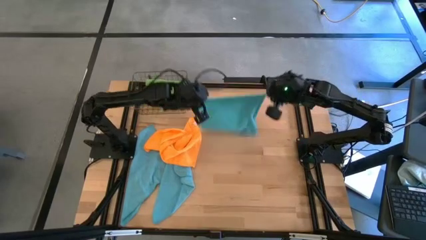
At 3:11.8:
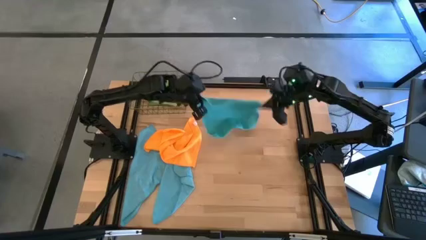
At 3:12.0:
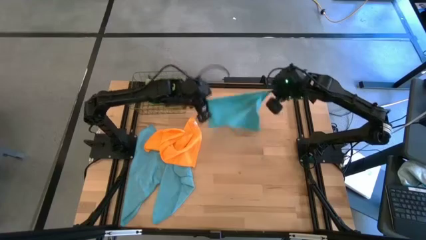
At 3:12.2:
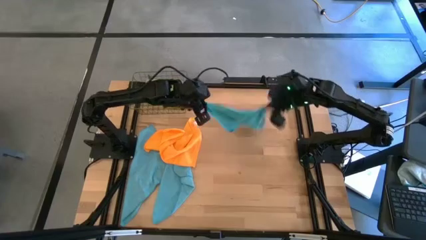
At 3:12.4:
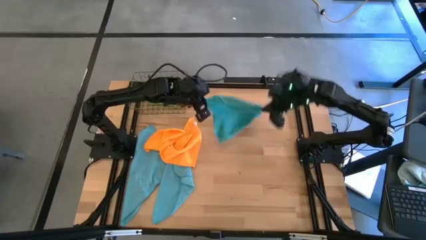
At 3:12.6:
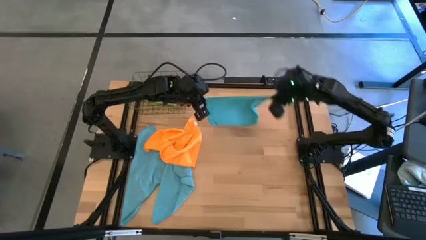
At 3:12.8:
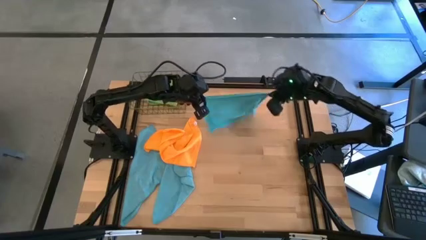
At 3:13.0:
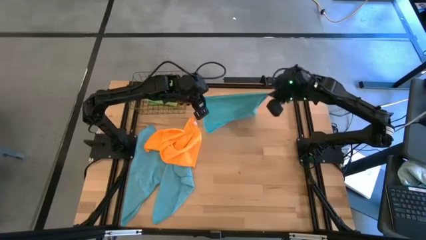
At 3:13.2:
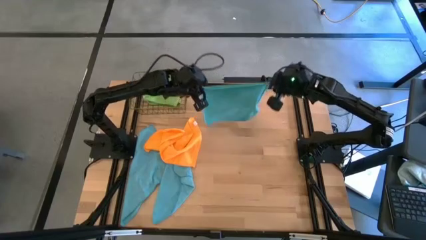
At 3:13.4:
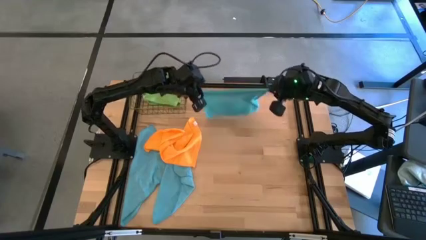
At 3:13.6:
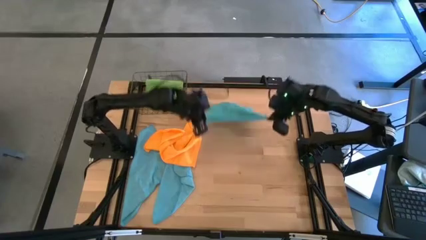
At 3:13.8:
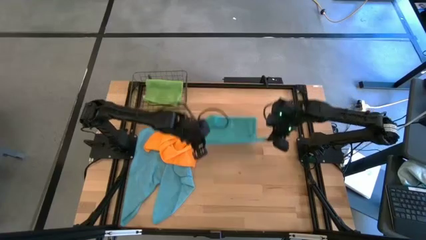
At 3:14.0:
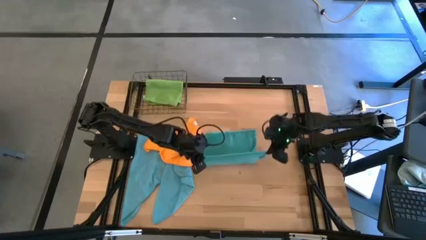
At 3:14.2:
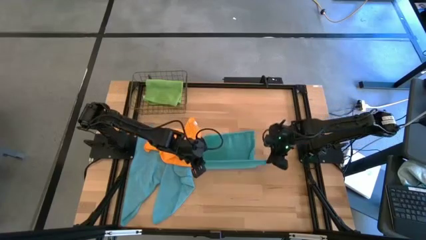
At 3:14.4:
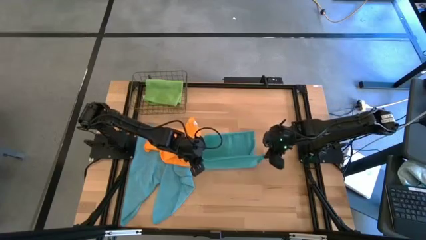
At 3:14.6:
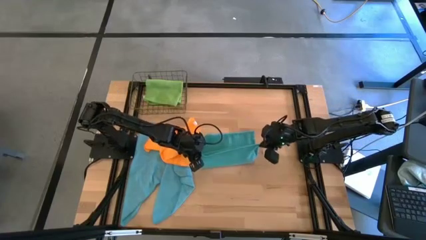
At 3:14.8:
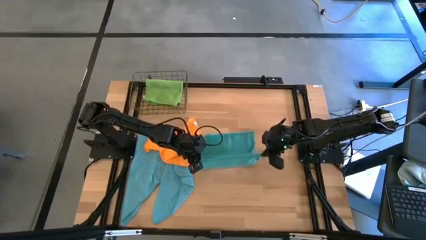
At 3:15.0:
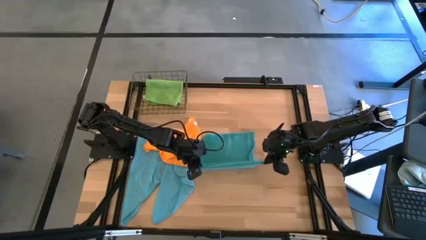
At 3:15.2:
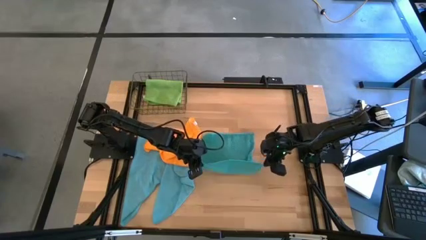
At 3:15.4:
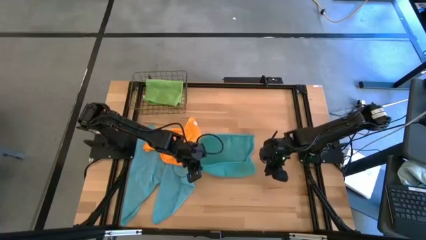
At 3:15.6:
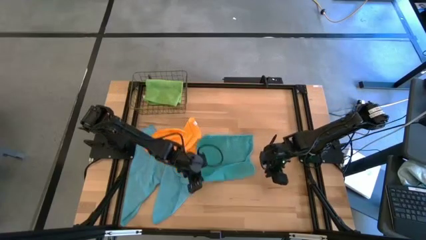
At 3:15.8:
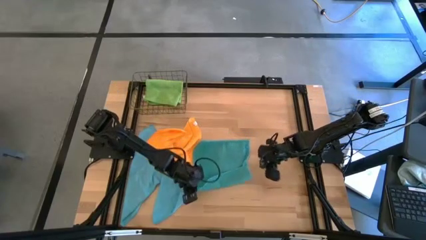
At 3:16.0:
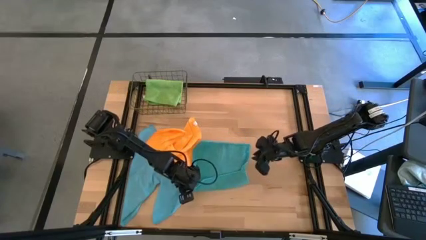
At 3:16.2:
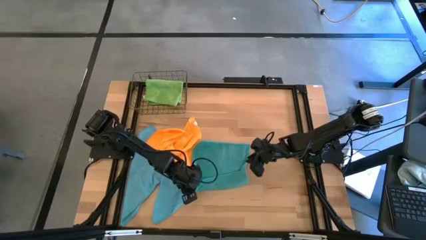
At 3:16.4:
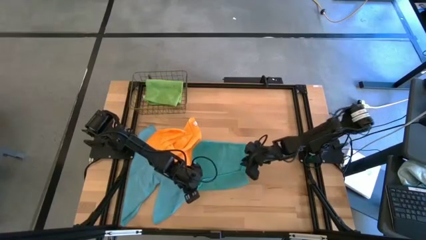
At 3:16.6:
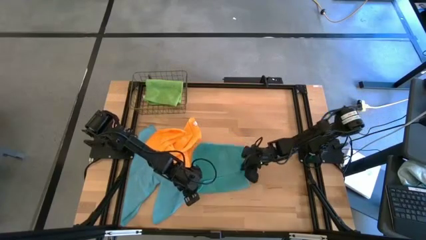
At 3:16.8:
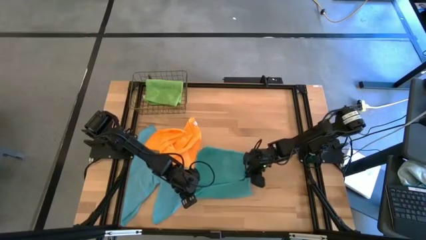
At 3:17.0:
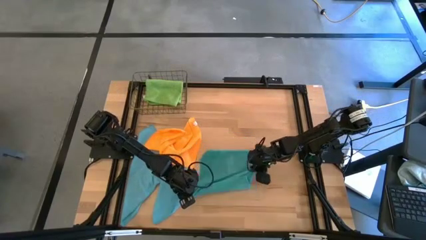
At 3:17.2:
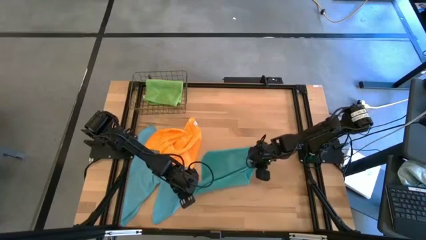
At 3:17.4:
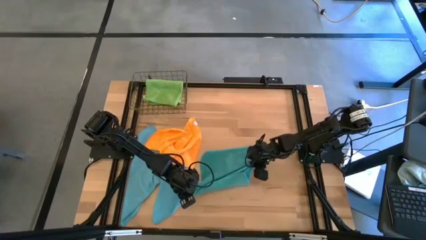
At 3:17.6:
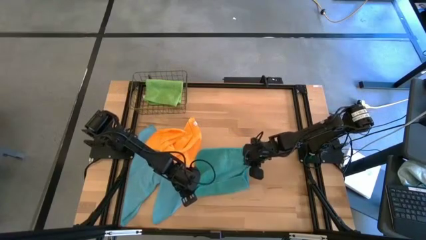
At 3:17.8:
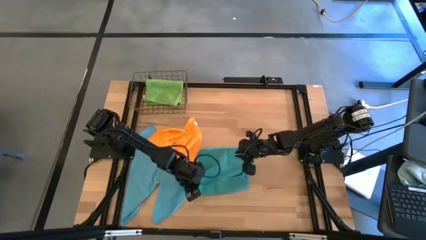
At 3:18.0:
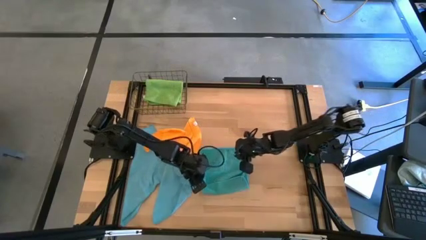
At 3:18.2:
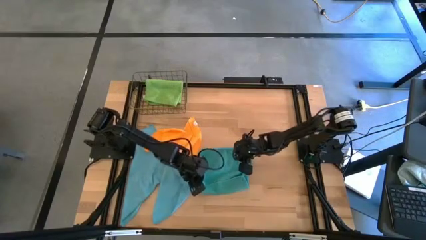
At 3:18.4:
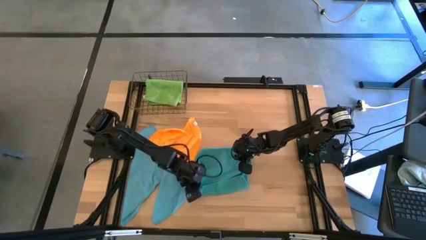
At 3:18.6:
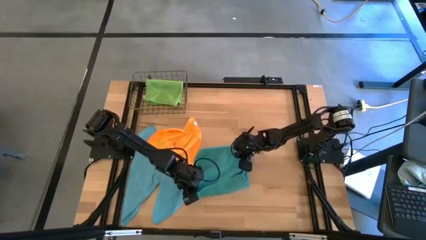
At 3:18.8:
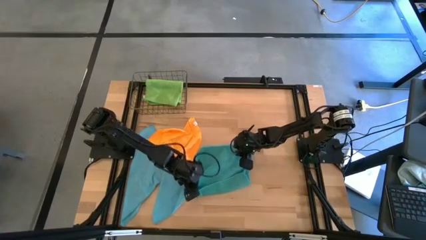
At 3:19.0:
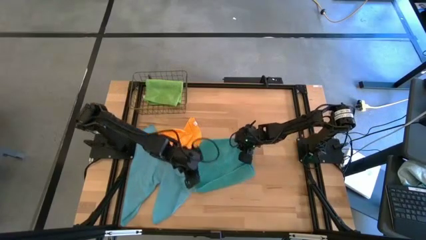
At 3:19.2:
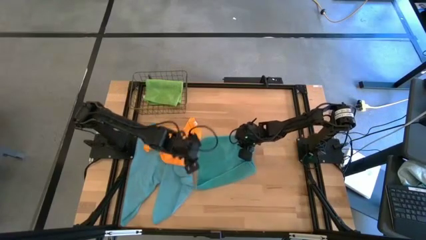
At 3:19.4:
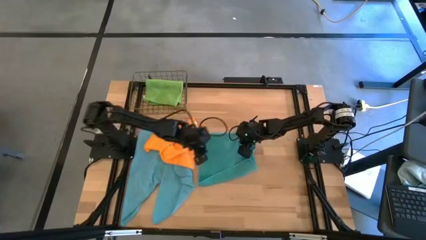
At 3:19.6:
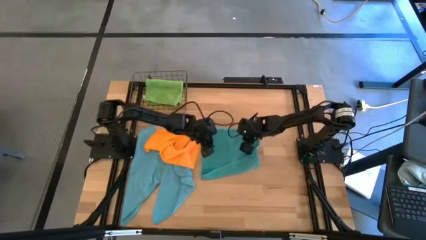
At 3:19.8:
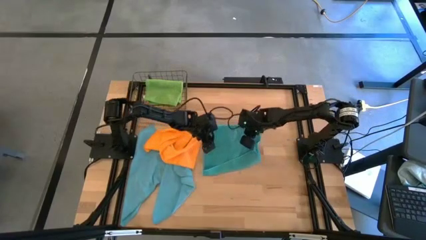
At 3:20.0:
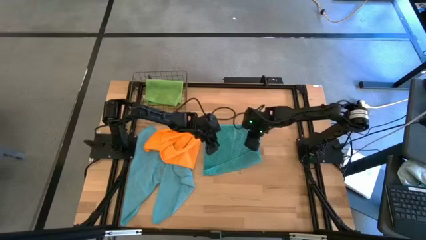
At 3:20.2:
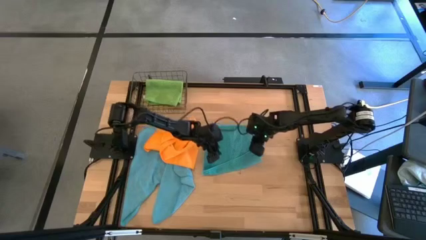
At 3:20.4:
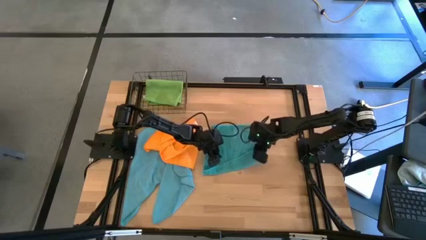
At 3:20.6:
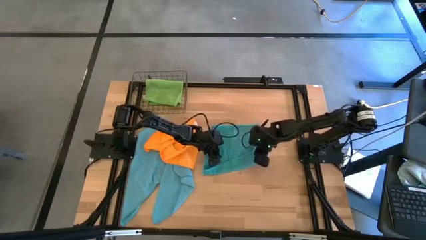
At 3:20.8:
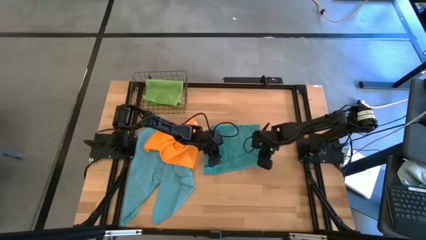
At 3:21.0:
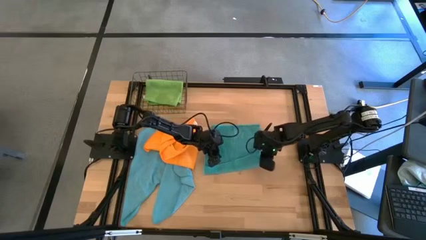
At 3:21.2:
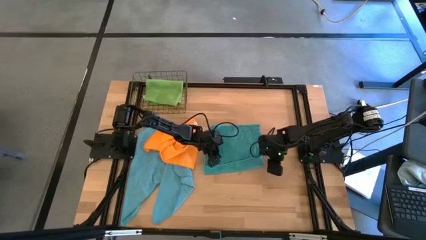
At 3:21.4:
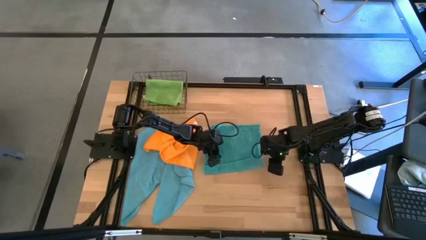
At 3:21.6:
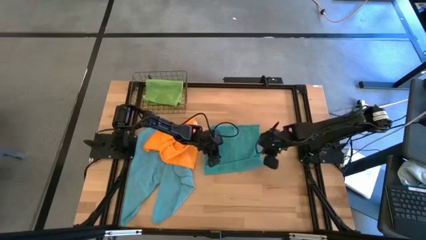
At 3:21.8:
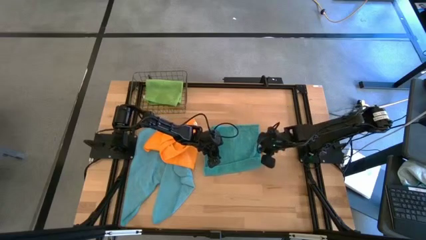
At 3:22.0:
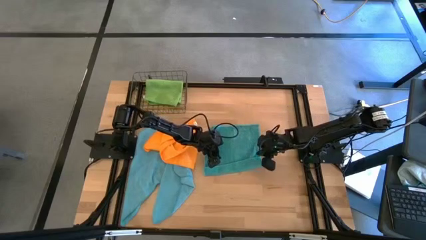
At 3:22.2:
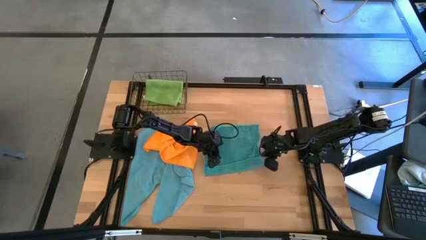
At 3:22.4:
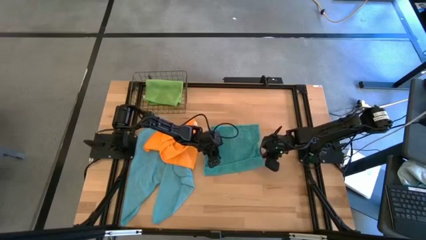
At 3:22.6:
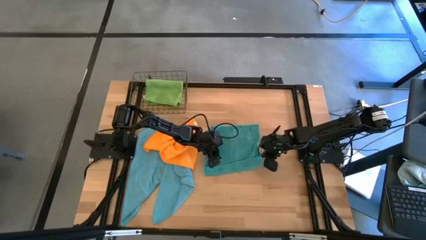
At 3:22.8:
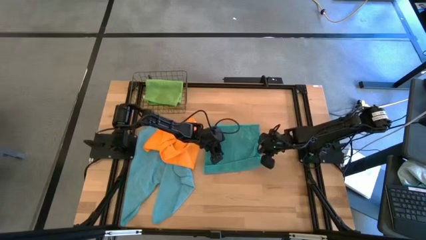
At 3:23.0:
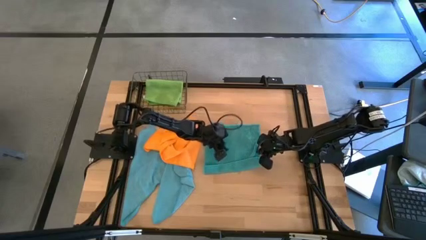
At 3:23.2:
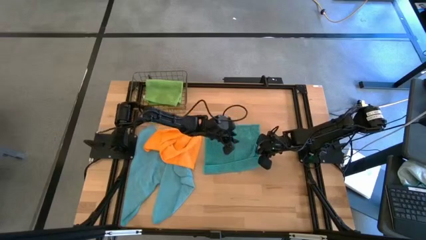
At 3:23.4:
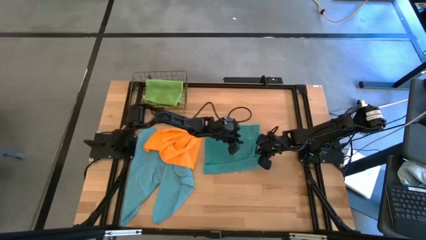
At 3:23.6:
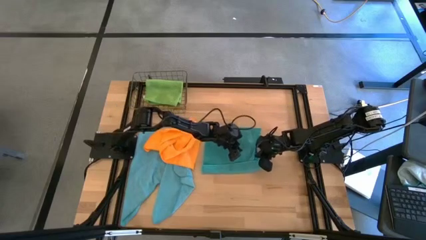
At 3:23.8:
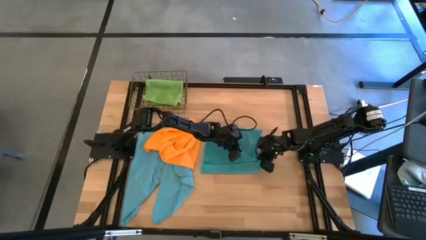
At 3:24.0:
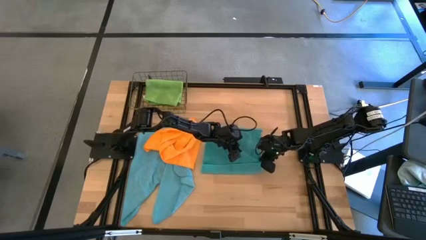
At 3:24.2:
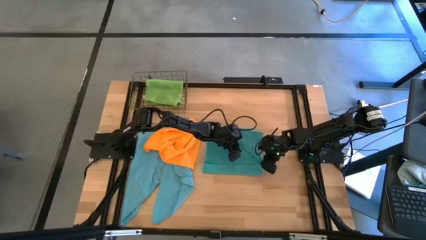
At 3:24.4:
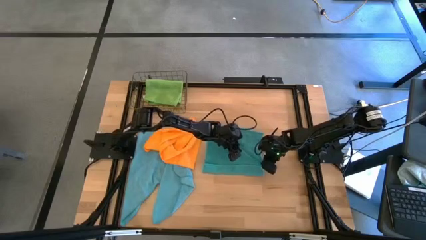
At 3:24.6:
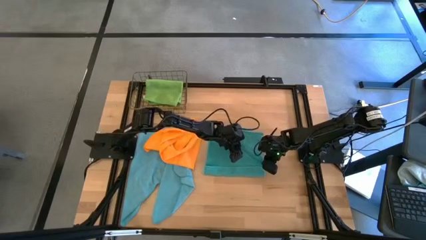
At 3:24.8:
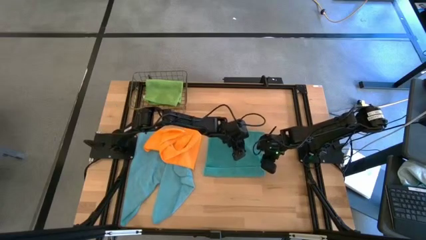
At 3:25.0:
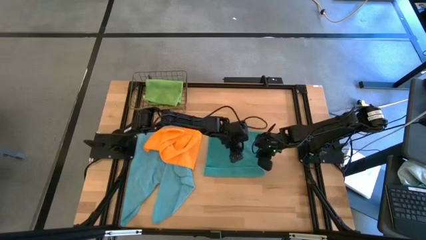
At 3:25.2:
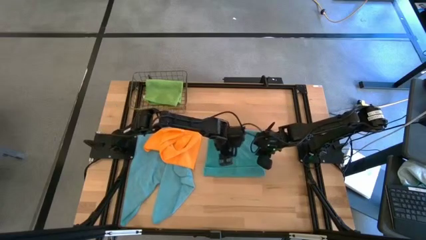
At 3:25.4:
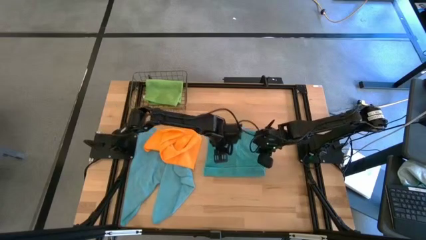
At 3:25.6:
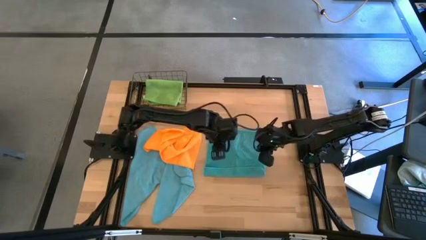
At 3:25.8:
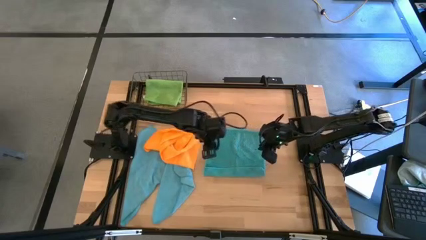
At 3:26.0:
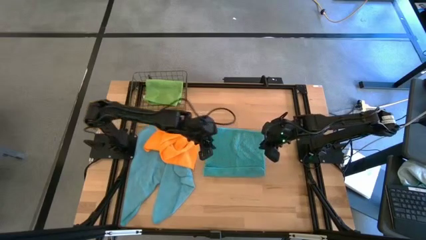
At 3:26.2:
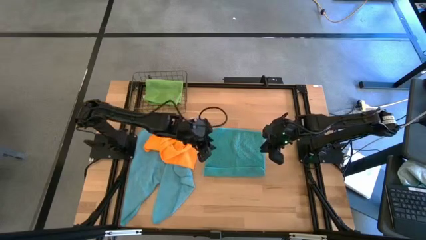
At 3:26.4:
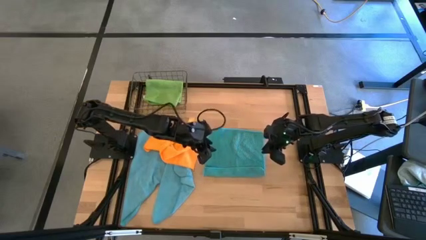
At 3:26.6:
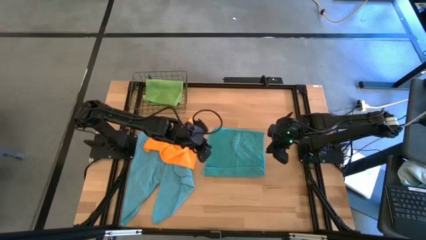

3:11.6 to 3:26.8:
Task: Fold microfiber towels
Fold the blue microfiber cloth
